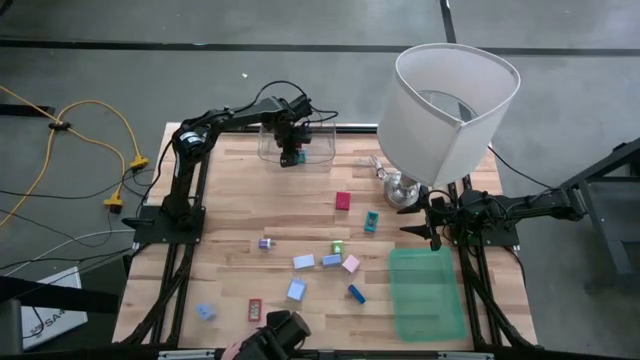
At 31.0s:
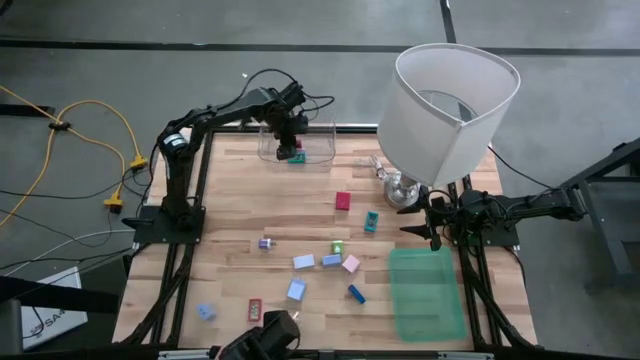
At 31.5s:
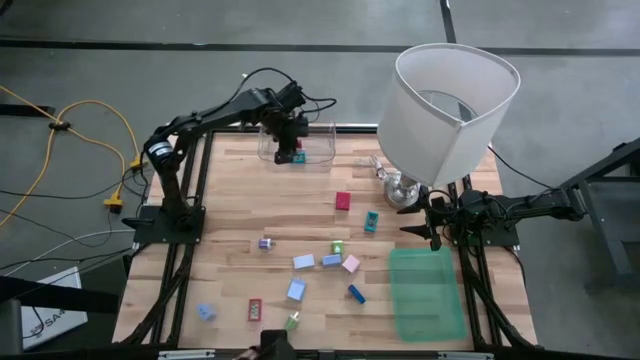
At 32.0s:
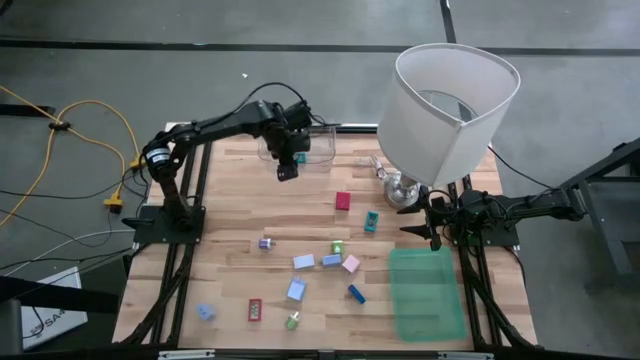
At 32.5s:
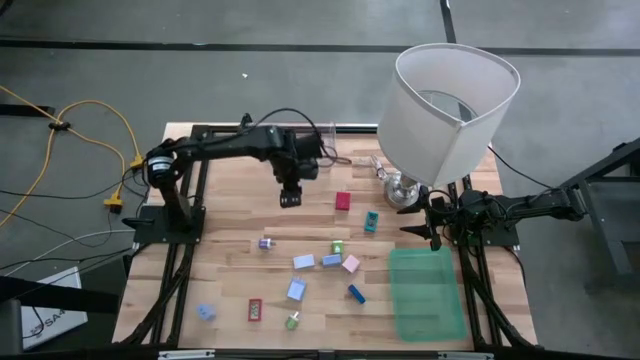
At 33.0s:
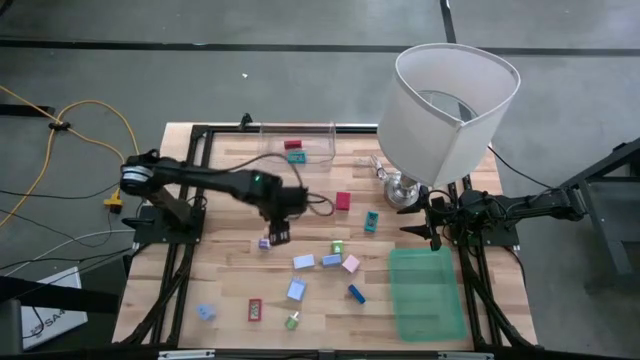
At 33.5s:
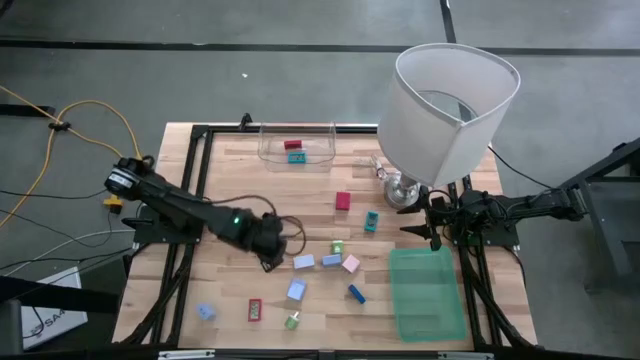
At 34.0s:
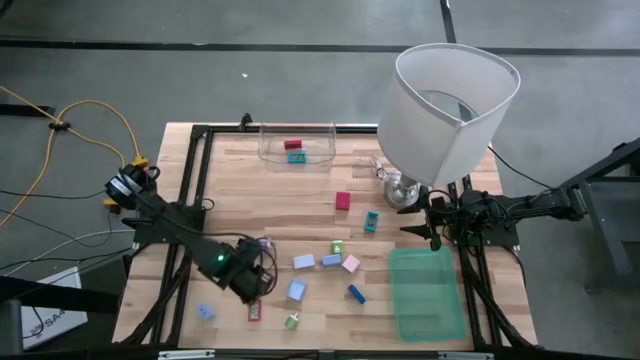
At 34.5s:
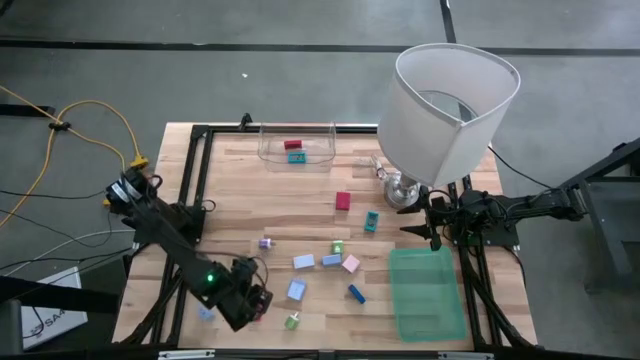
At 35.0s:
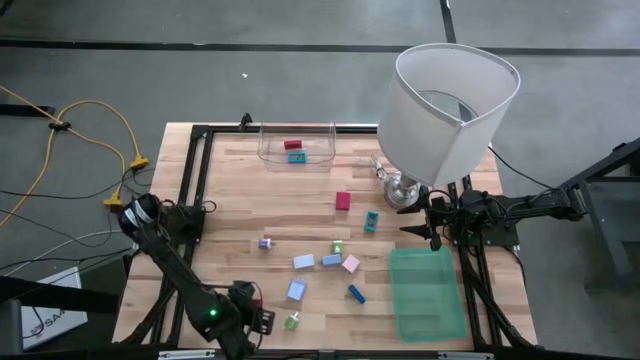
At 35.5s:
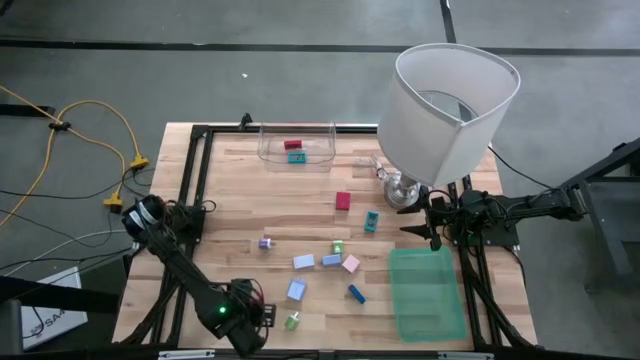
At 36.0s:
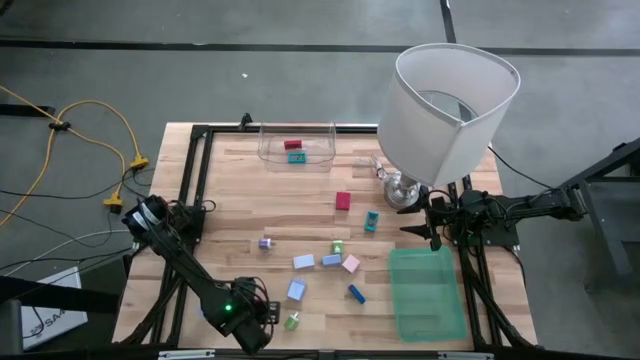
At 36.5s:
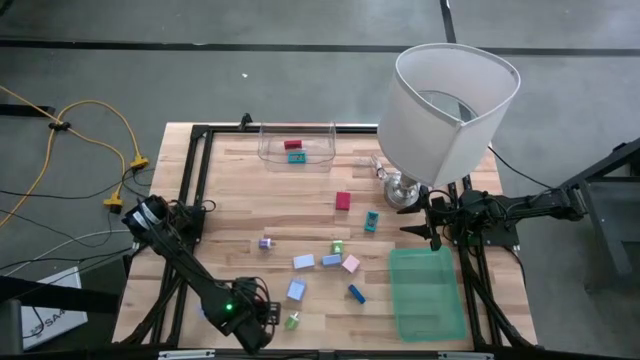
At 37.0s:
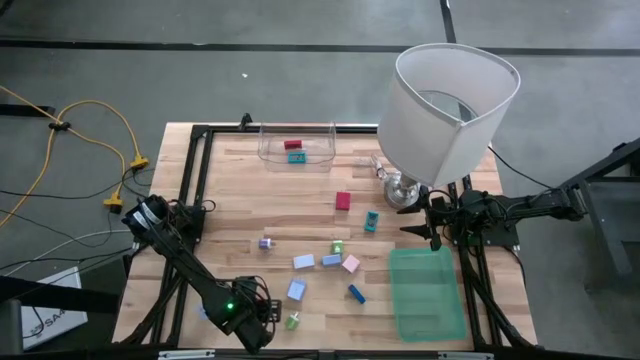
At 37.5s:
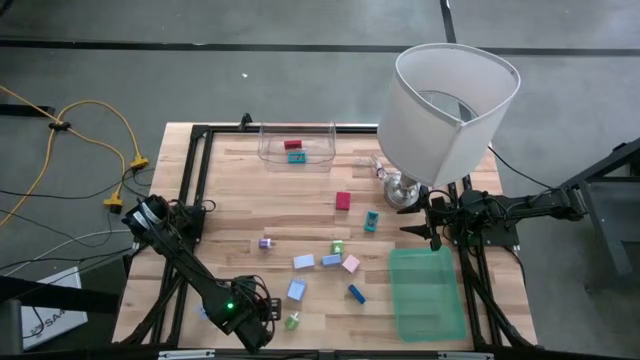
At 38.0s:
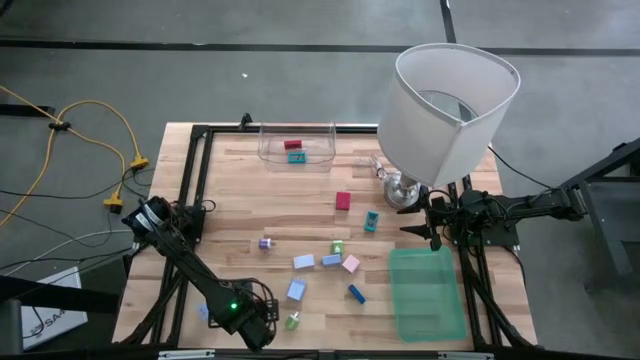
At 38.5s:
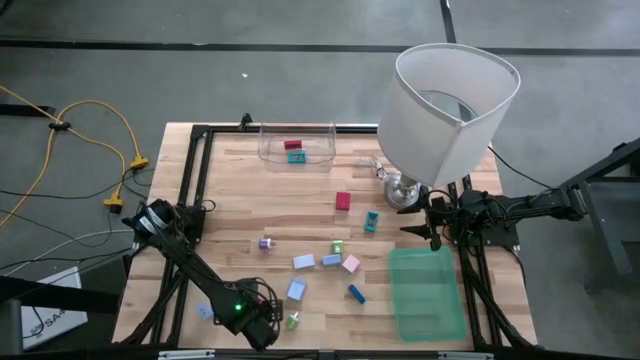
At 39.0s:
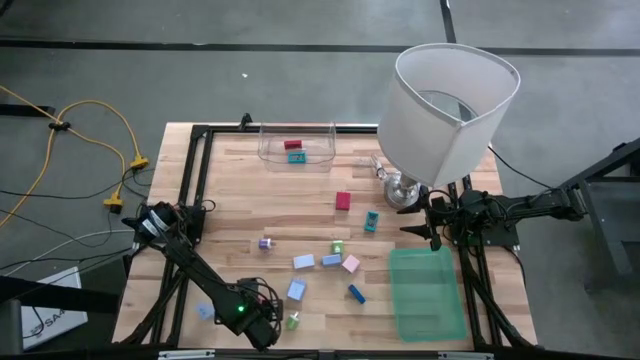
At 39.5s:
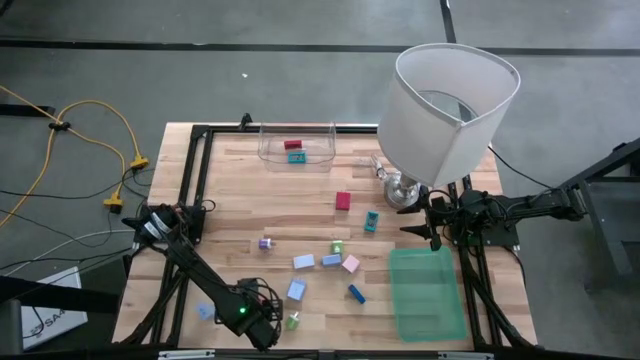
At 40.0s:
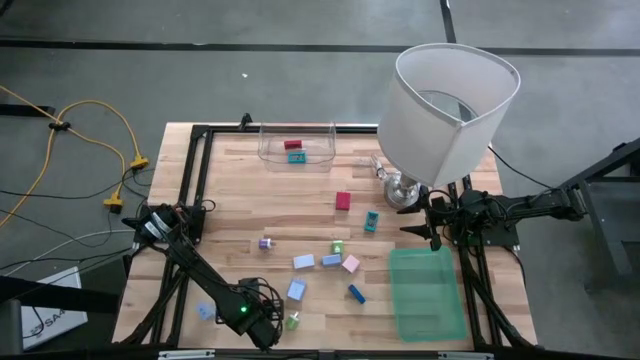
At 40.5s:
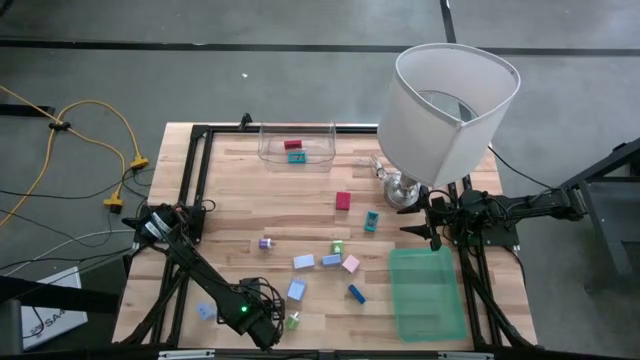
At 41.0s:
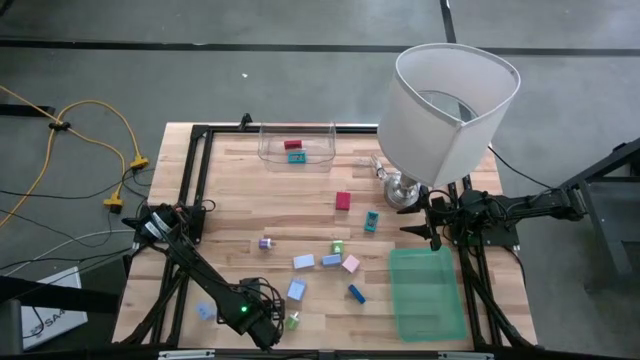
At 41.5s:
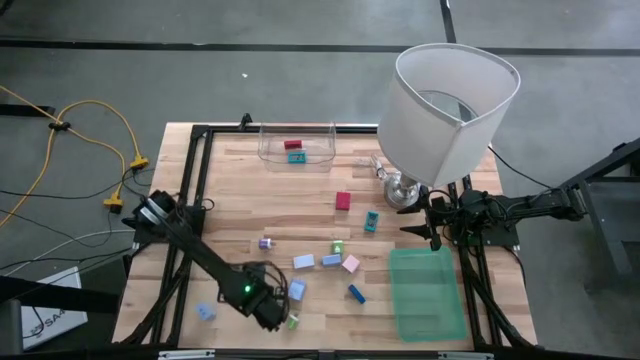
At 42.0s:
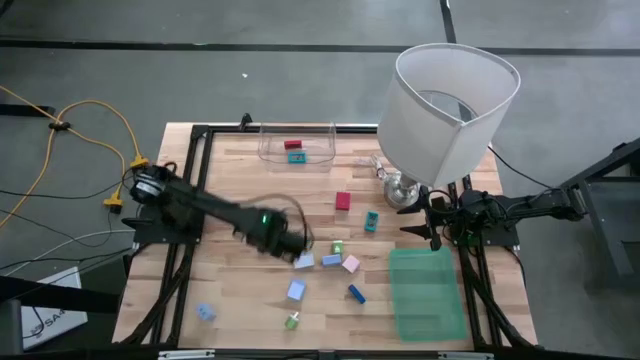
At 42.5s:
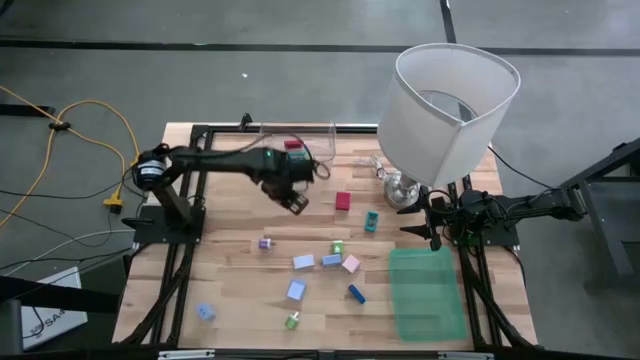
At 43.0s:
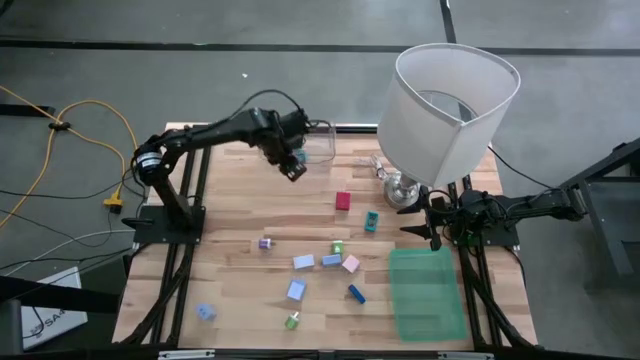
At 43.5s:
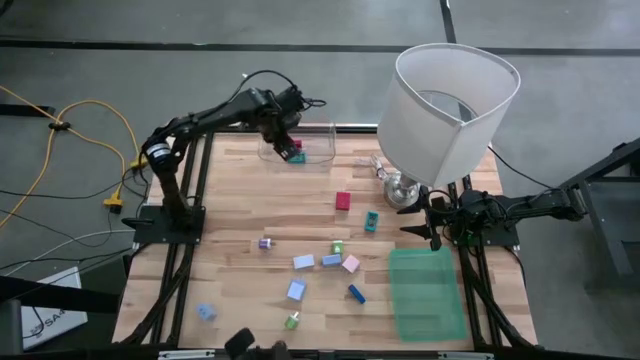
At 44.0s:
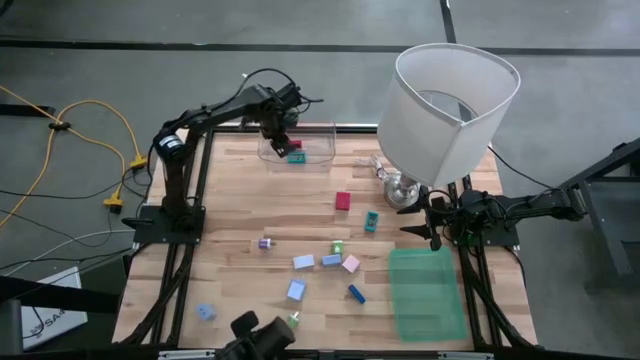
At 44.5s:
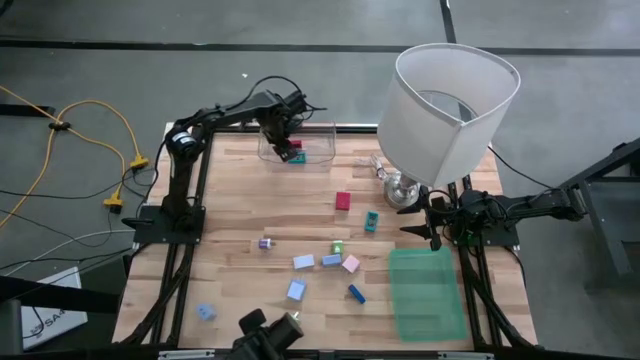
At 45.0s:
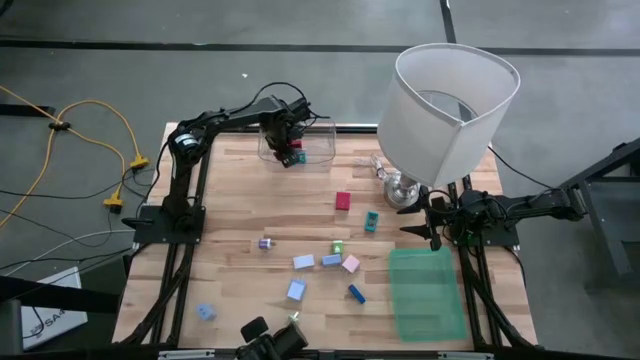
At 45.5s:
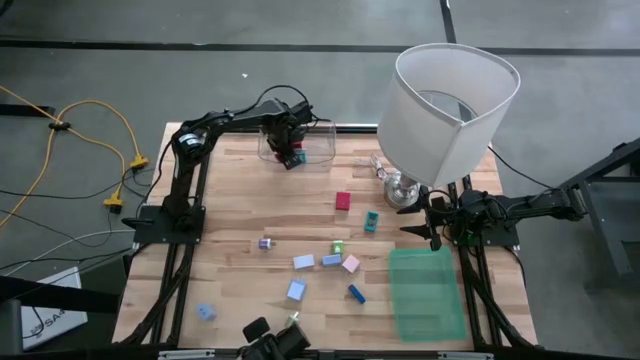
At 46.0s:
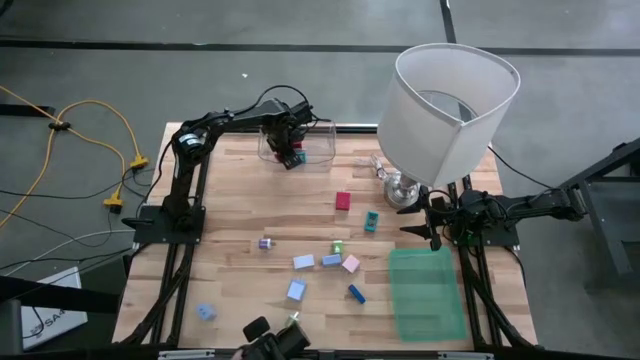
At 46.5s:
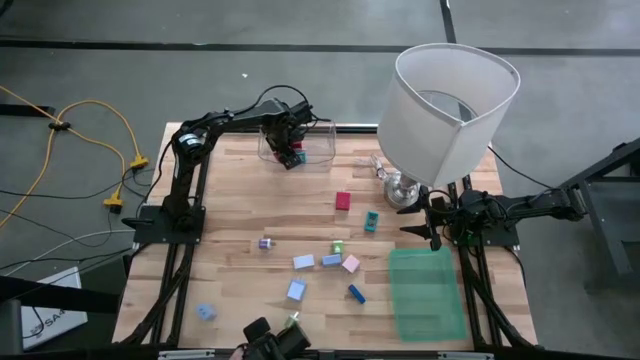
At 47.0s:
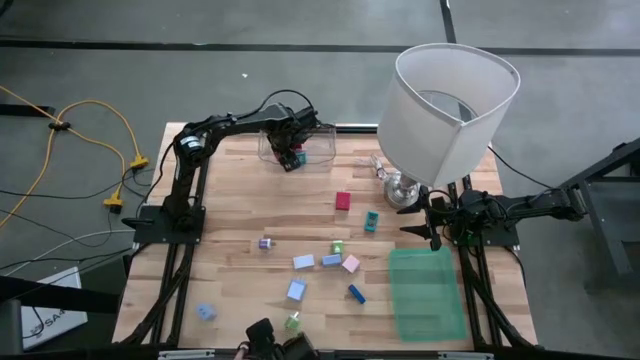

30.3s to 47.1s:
Task: Pick & Place Office items
Put the red digital clock into the transparent bin

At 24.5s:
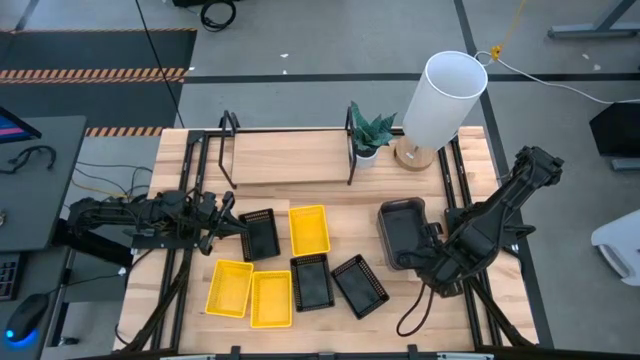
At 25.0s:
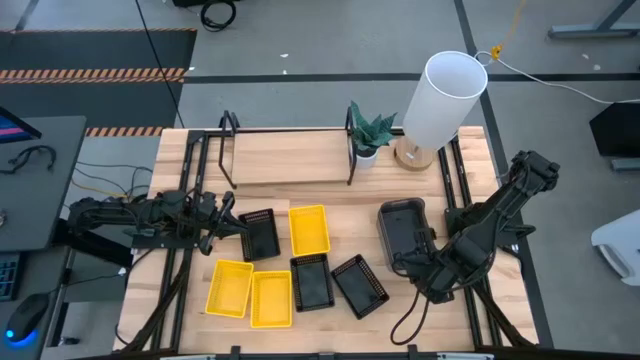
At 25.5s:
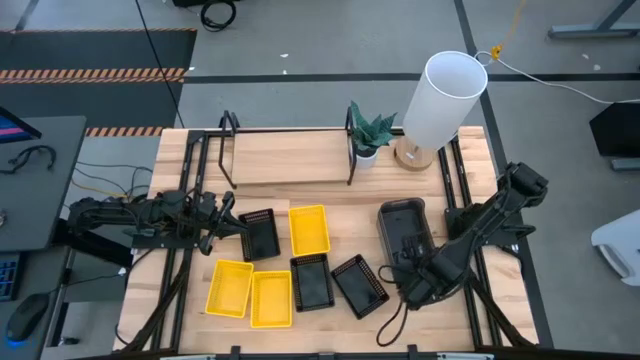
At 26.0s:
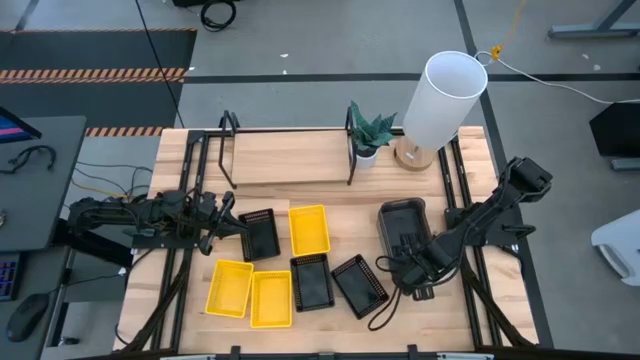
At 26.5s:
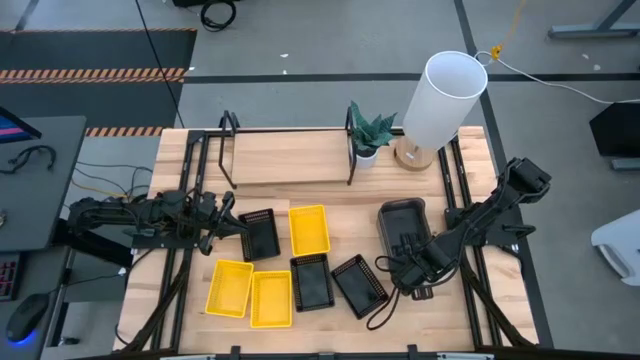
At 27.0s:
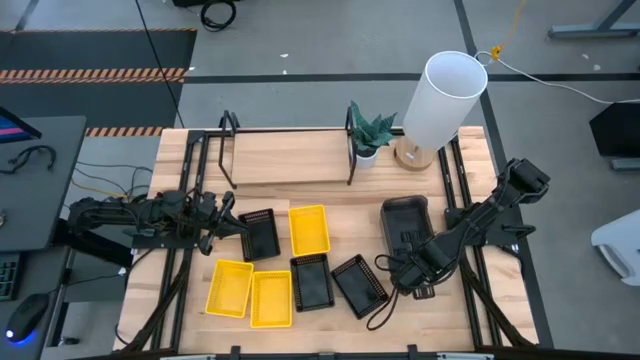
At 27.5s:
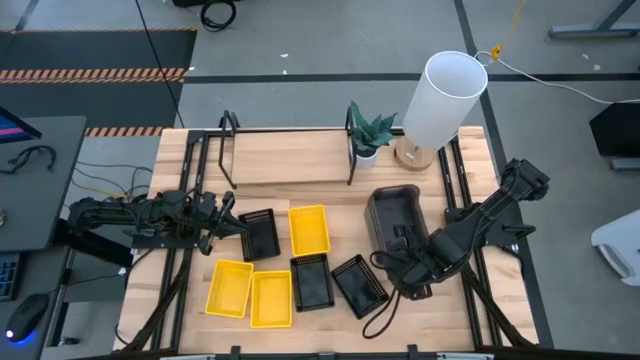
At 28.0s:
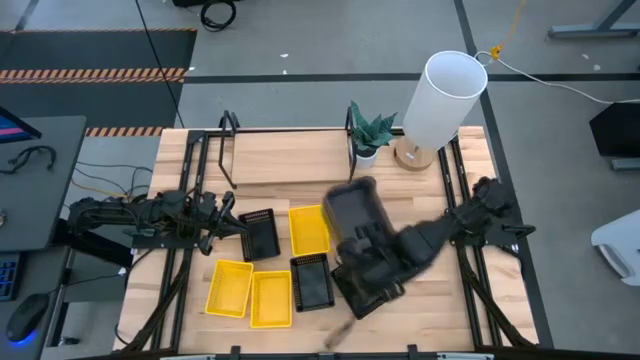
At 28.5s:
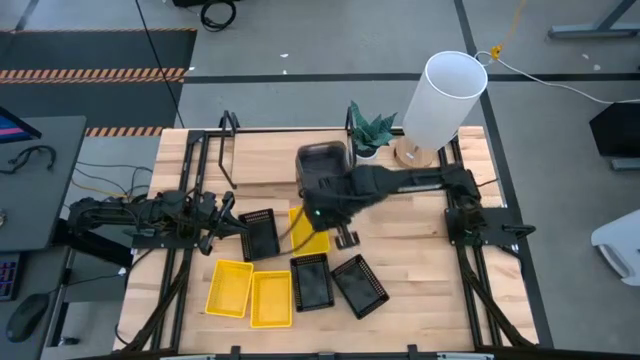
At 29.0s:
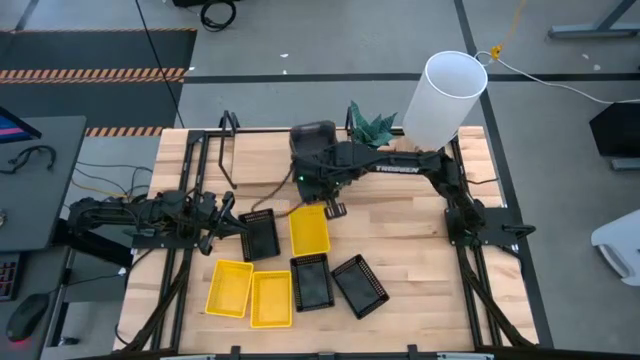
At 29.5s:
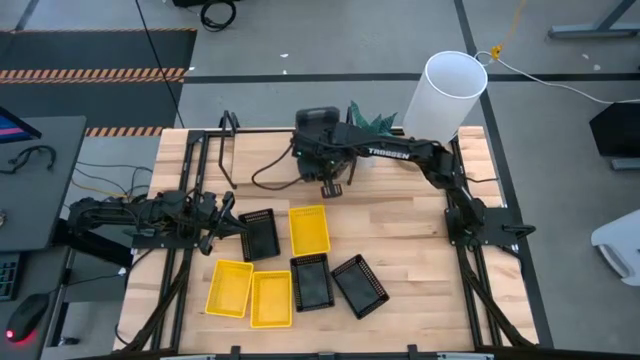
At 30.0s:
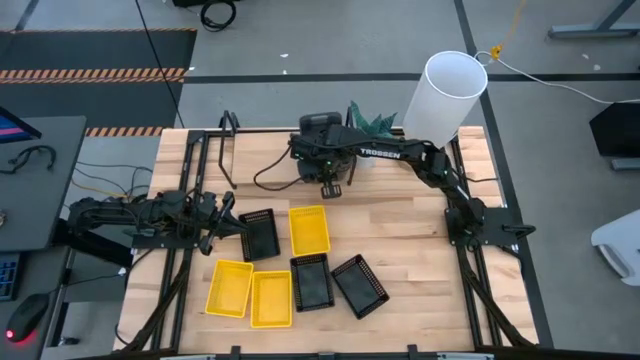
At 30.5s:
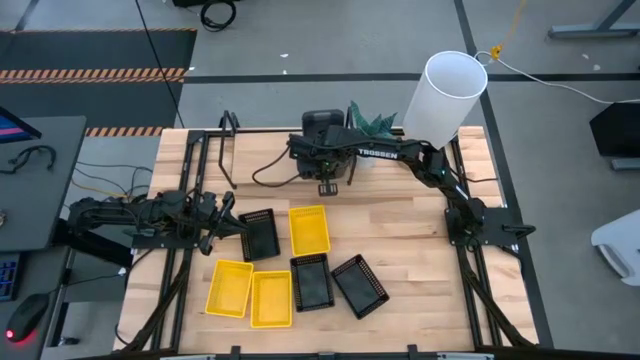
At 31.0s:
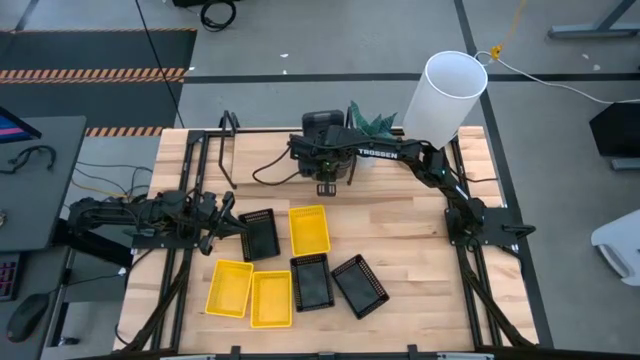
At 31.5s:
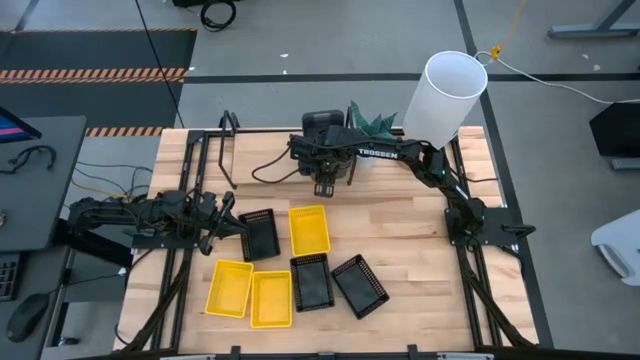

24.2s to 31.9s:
Task: Stack baskets on shelf by color
Put the stacked gray bins on the shelf
